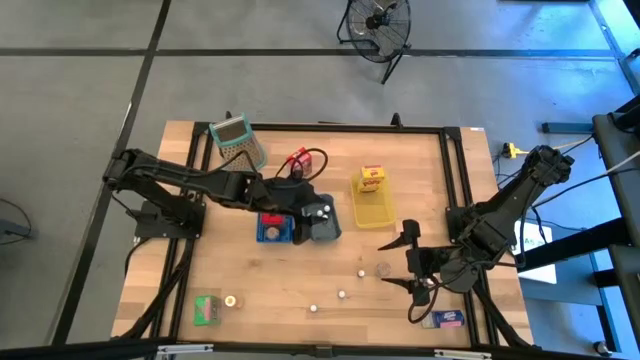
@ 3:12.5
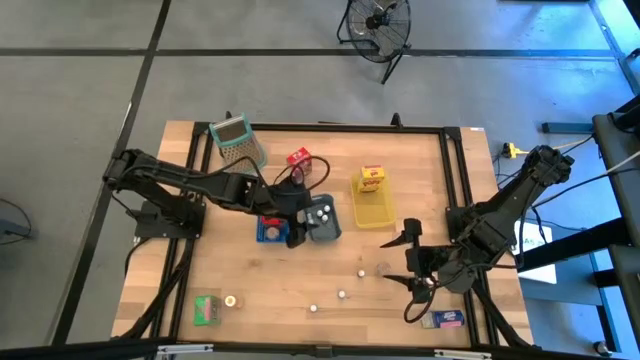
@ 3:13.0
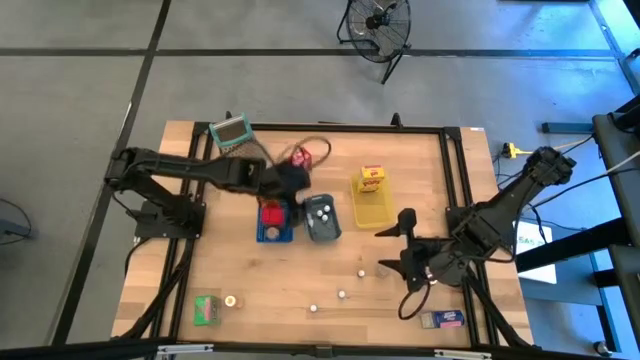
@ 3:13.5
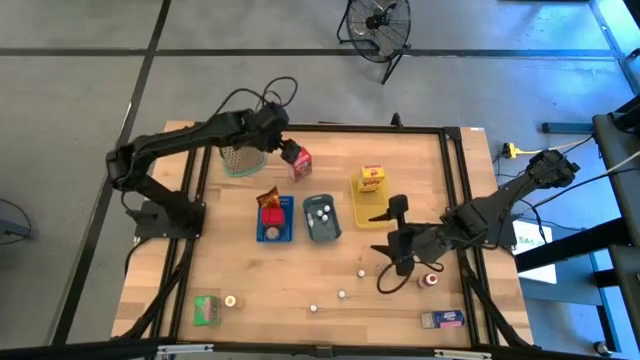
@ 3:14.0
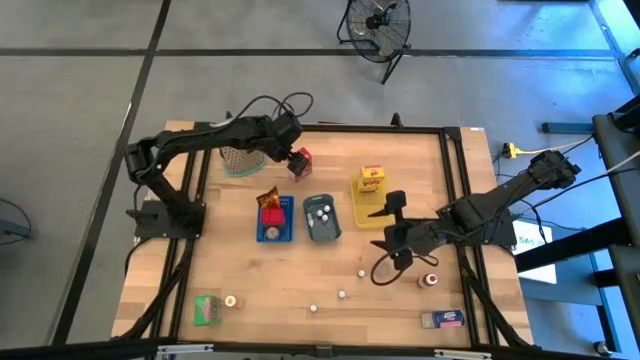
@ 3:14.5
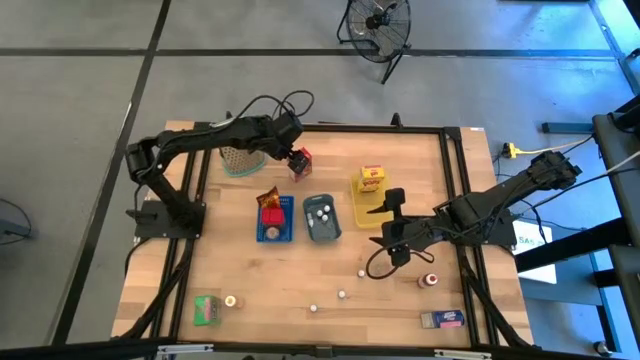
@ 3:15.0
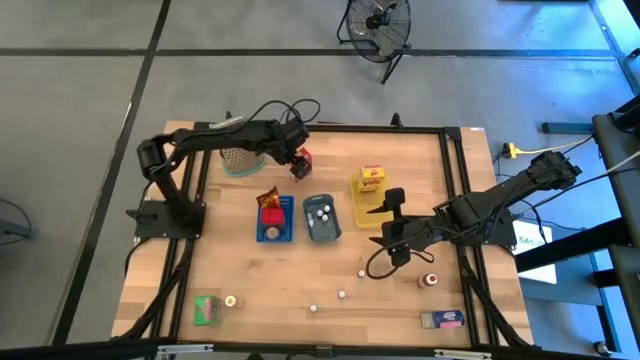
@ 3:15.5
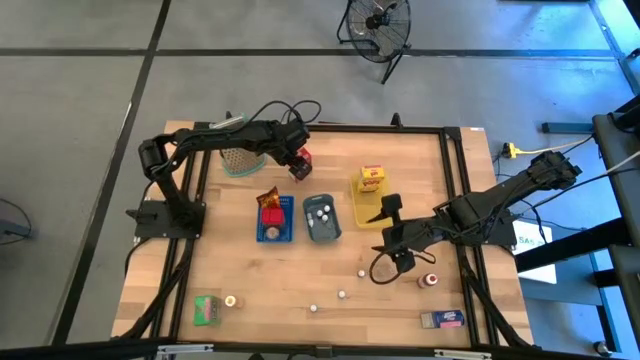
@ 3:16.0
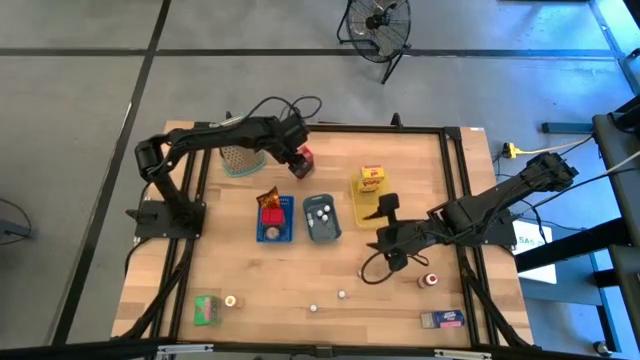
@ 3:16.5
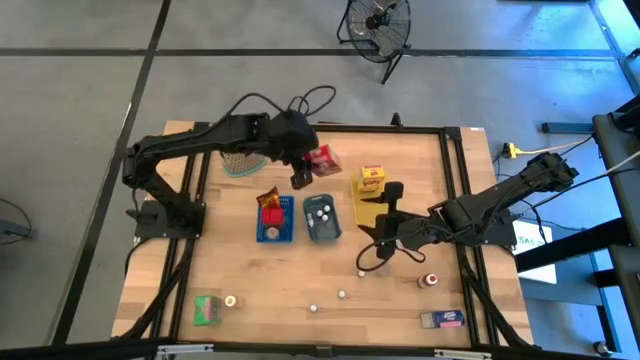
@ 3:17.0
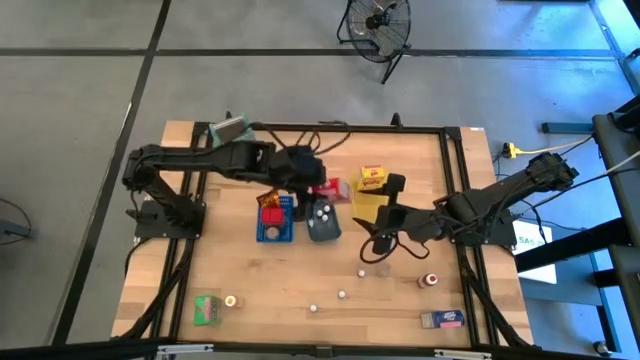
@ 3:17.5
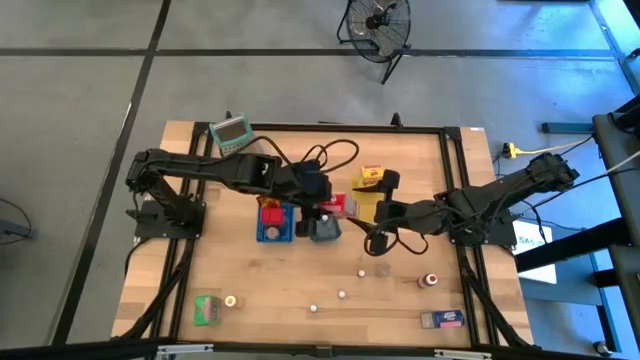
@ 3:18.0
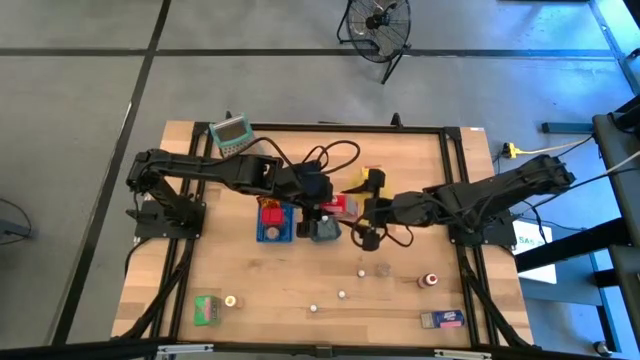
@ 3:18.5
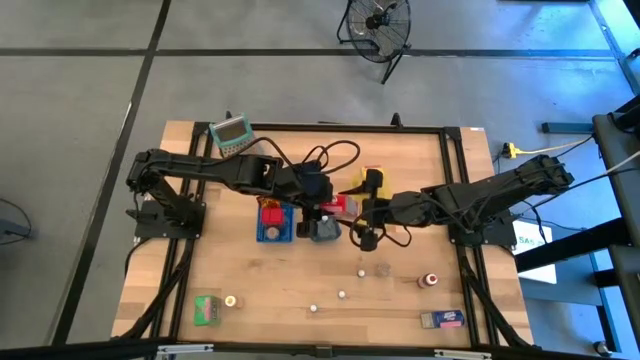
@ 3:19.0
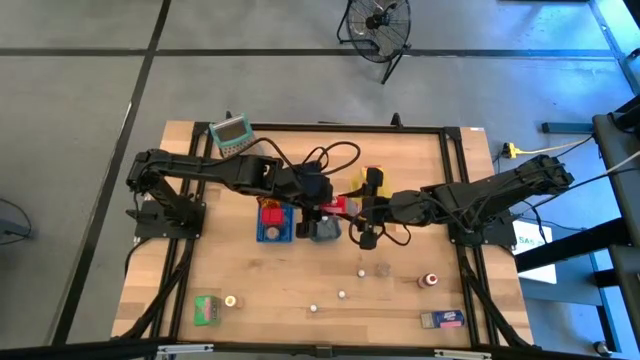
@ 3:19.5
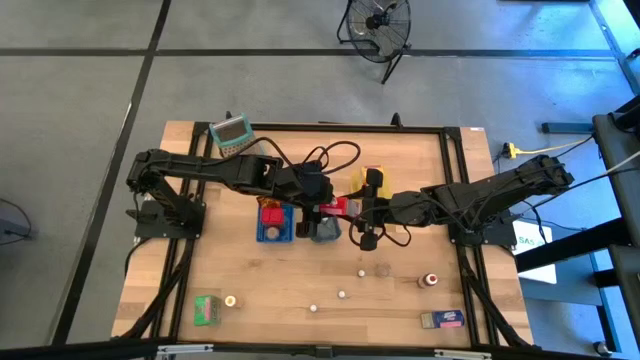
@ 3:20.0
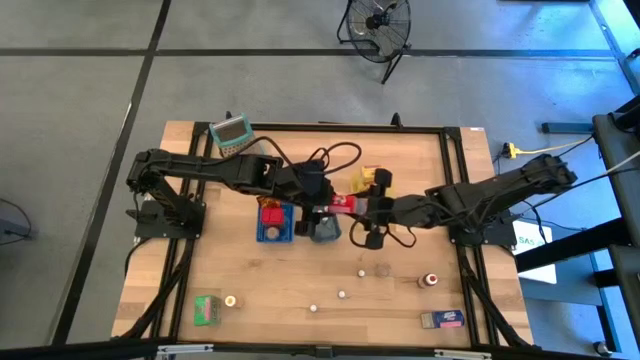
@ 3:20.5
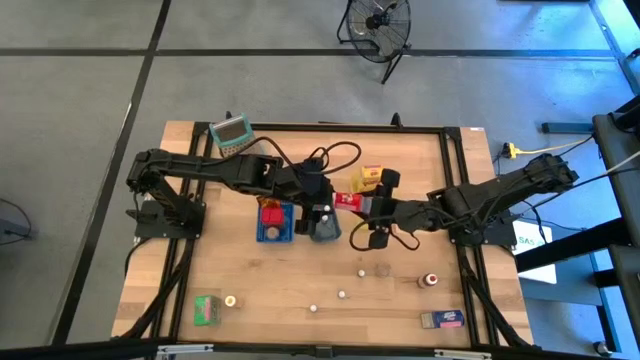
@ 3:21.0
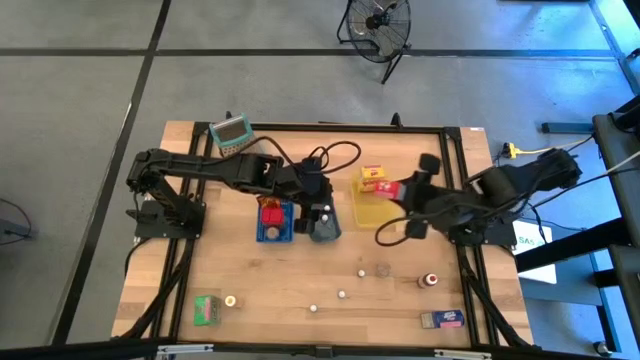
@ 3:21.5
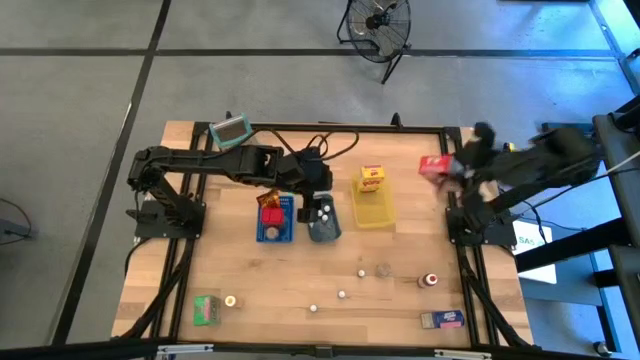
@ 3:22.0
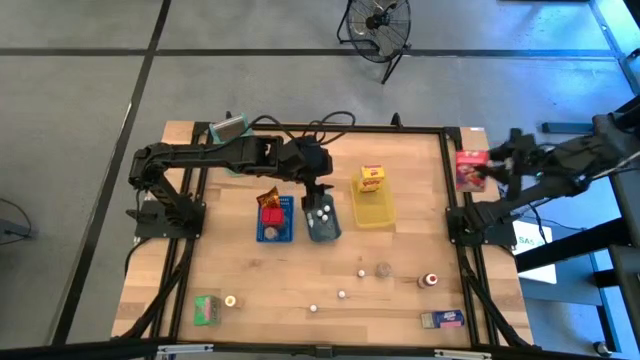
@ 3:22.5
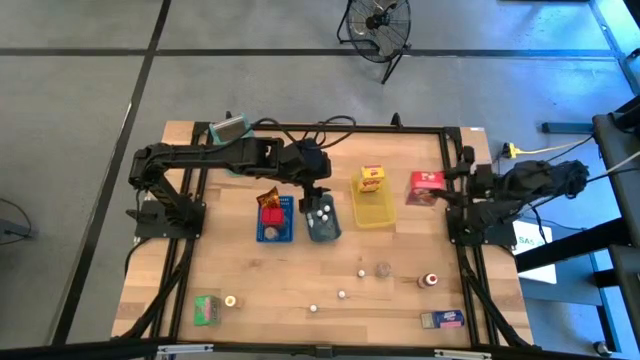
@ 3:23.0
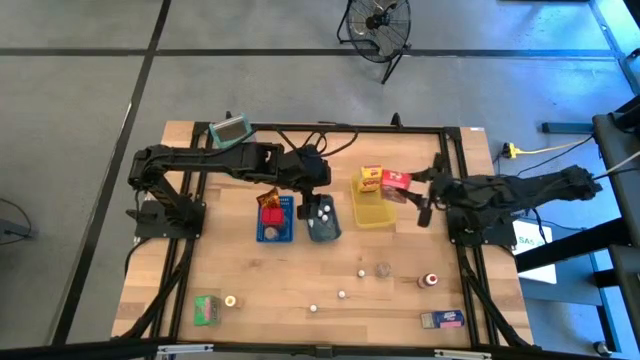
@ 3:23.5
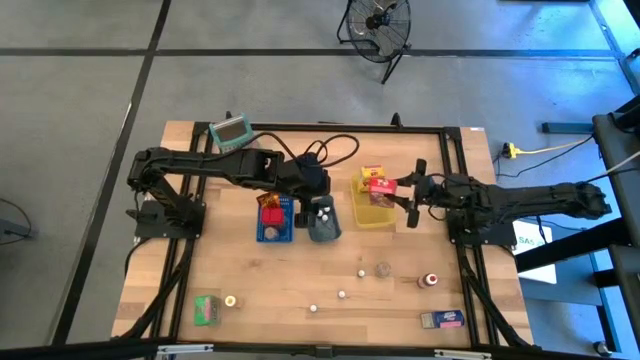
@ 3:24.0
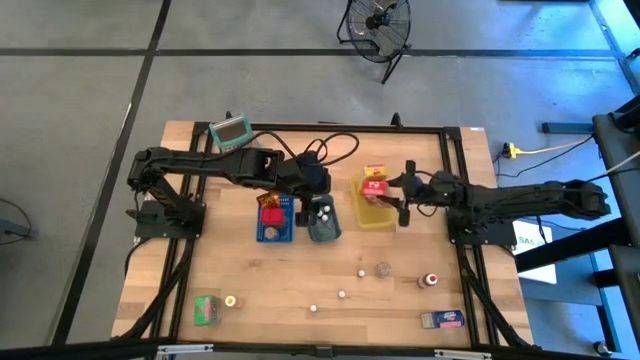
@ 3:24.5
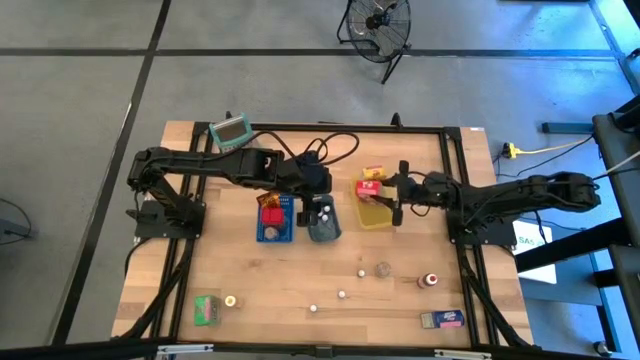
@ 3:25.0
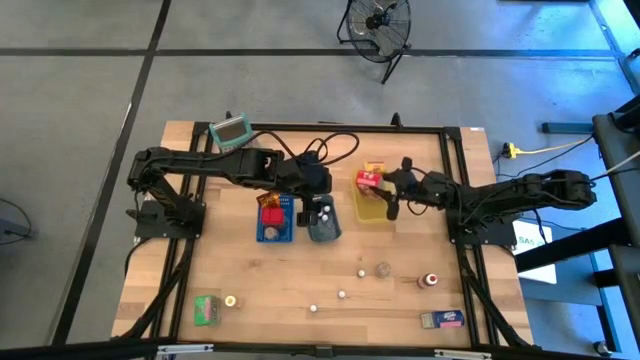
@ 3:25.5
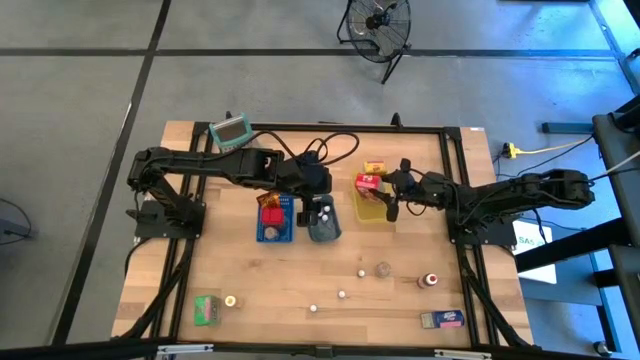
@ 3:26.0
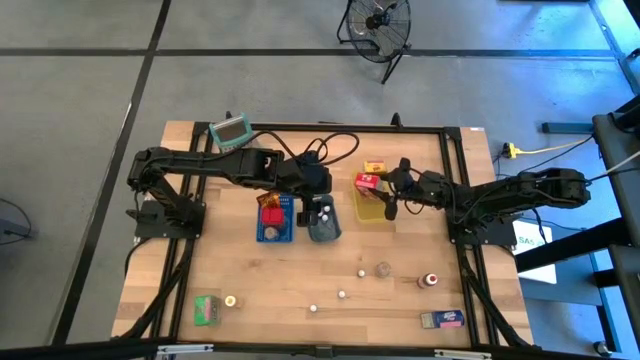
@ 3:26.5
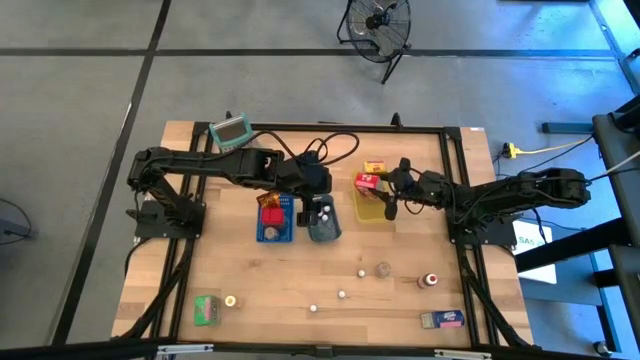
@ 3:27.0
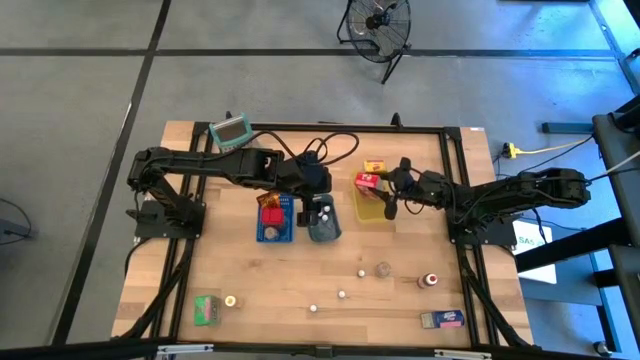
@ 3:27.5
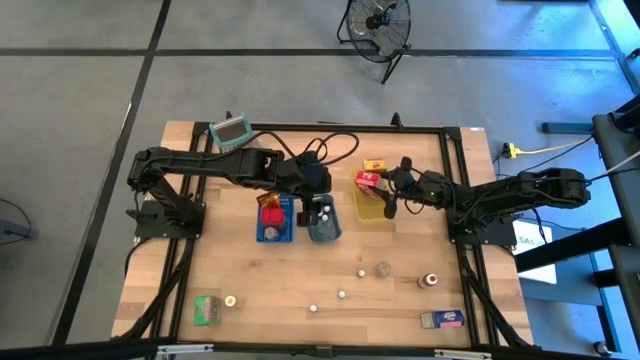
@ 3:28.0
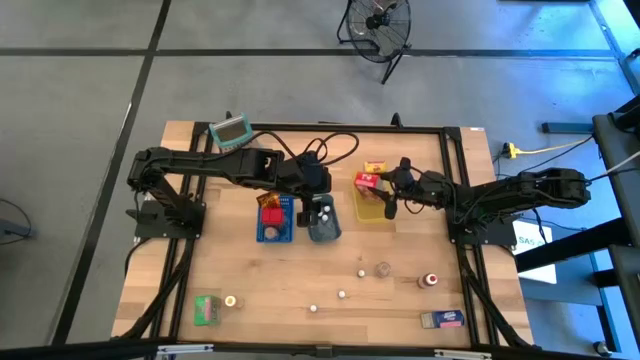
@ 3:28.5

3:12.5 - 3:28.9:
Task: Pick & Place Kitchen Items
Put the red cereal box into the yellow bin

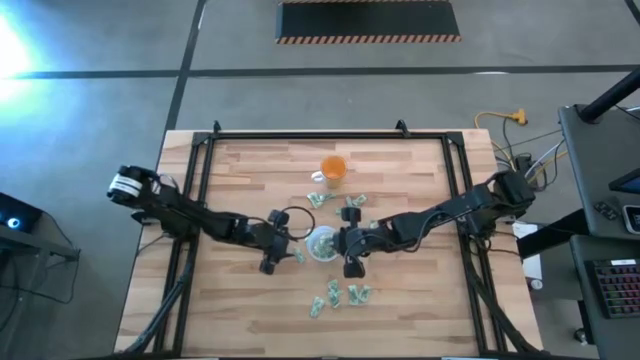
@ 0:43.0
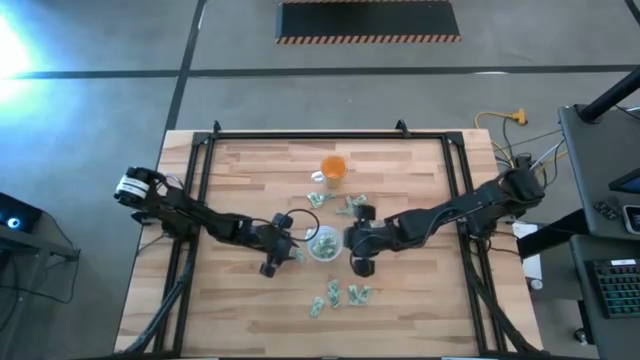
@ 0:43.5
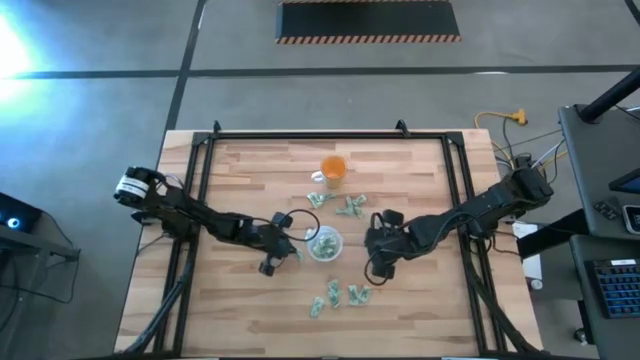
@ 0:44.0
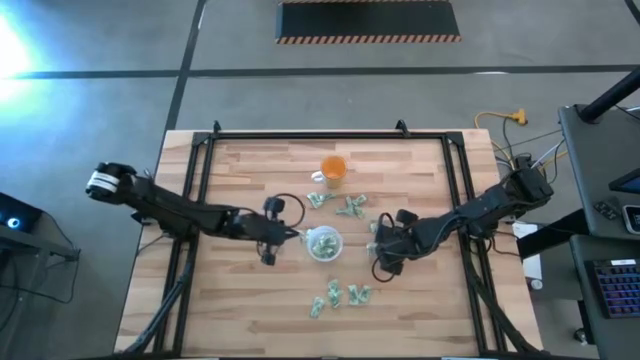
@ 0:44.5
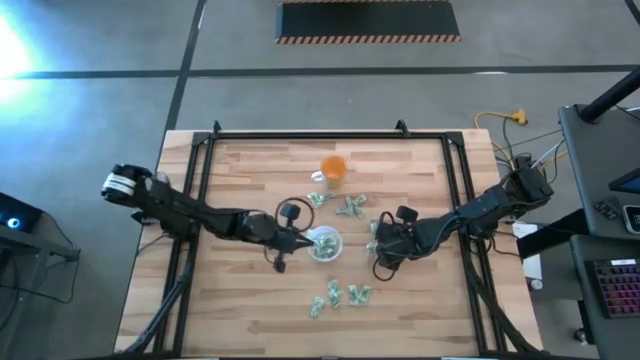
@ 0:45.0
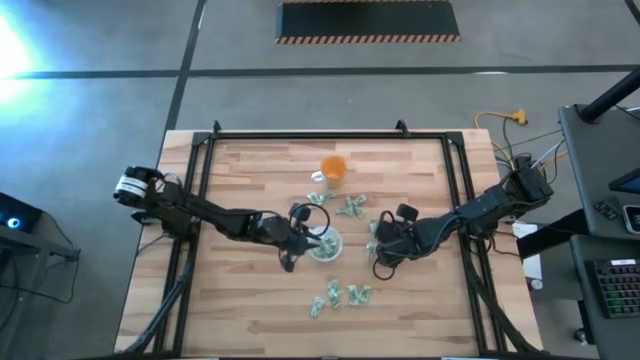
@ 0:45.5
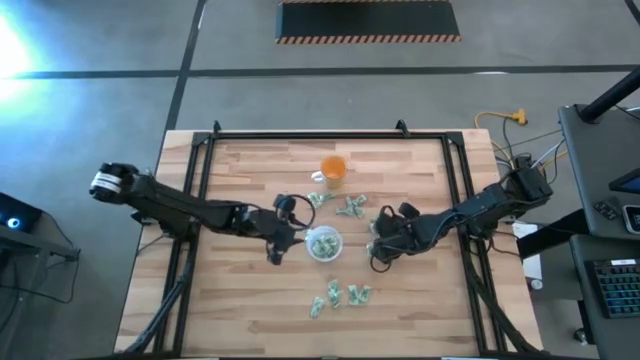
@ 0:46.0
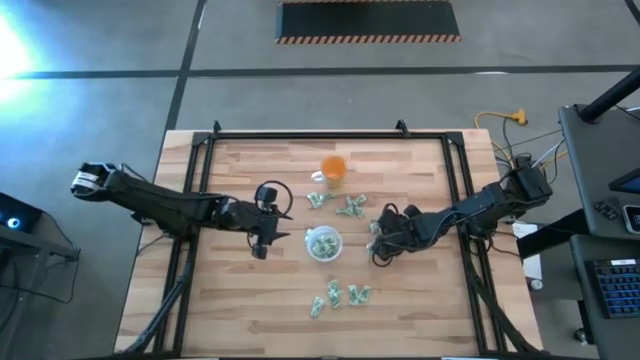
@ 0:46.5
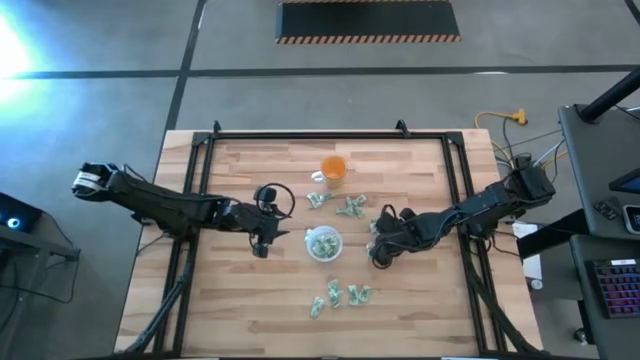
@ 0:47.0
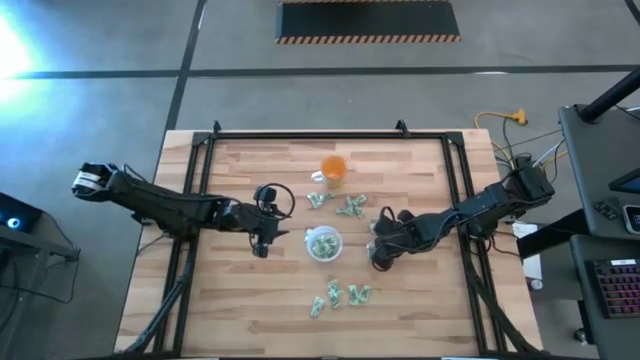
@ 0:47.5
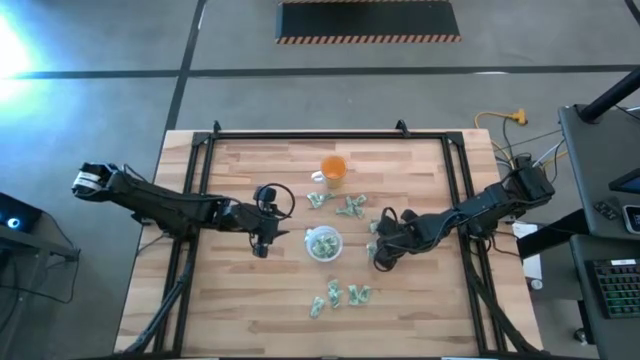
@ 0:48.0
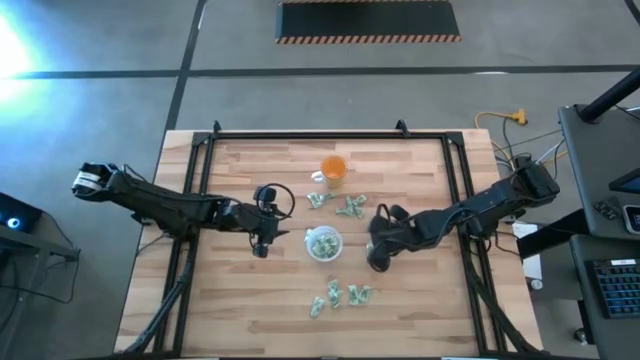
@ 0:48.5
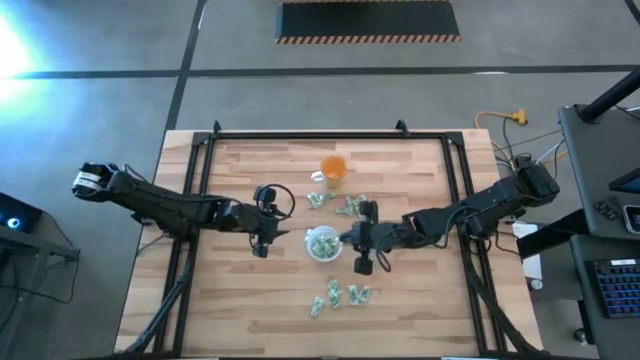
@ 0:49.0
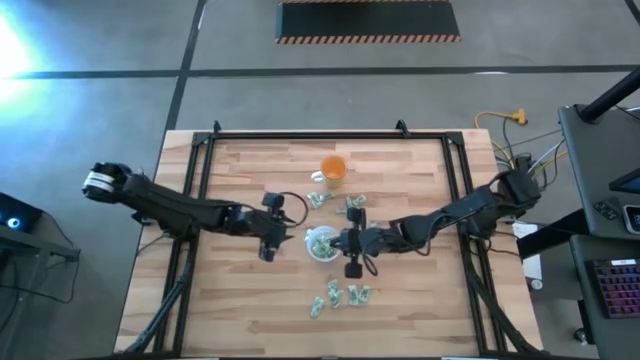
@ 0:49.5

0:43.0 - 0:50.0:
Task: Pick and place Stevia / Truvia into bins
Put the green stevia packet into the transparent container
